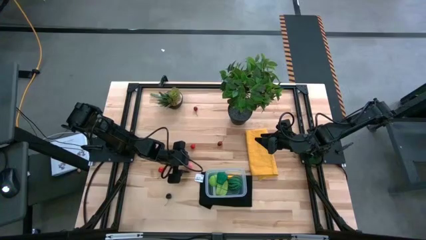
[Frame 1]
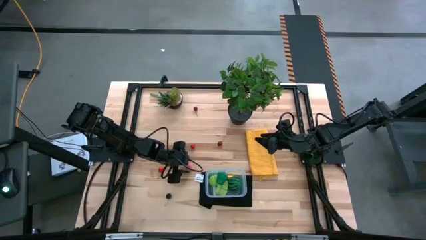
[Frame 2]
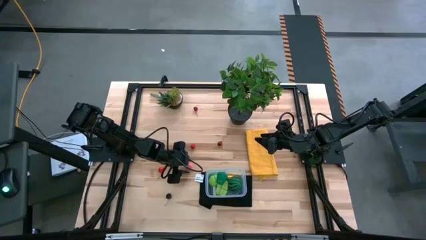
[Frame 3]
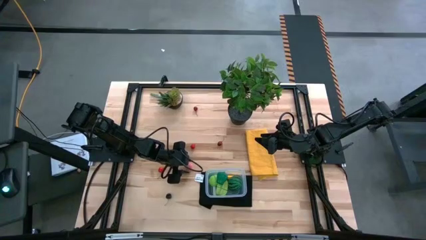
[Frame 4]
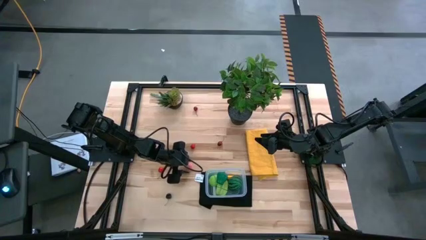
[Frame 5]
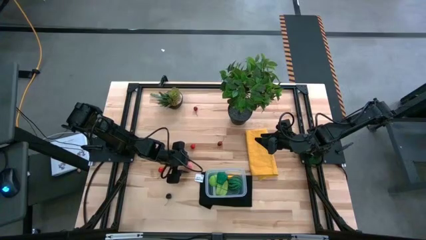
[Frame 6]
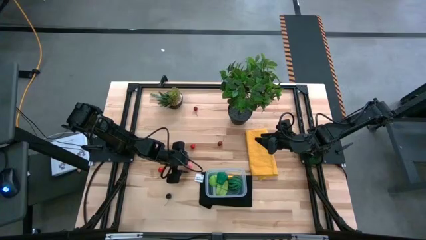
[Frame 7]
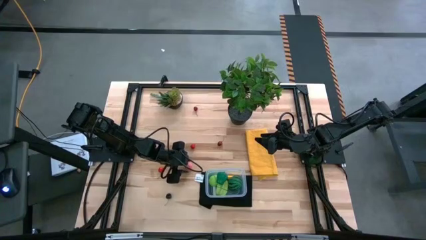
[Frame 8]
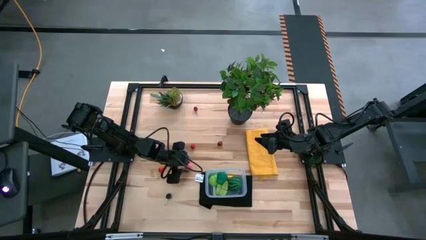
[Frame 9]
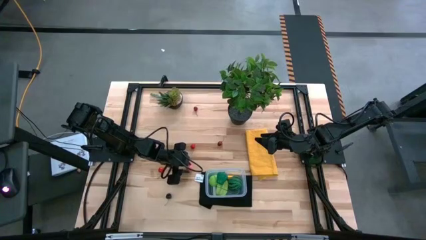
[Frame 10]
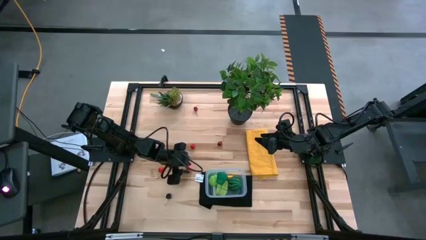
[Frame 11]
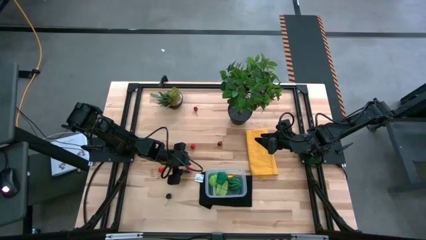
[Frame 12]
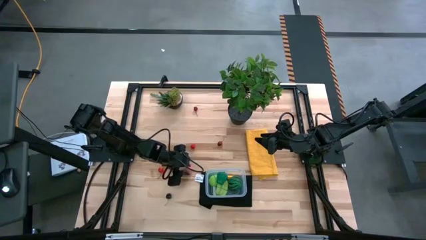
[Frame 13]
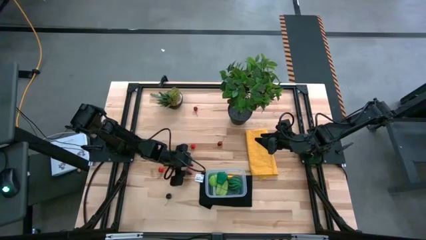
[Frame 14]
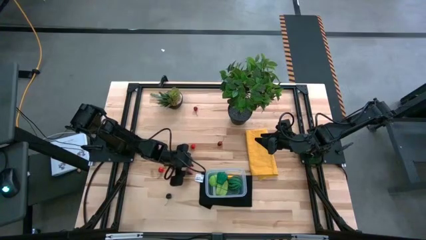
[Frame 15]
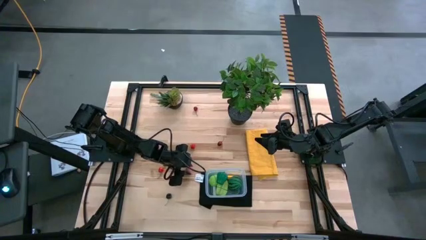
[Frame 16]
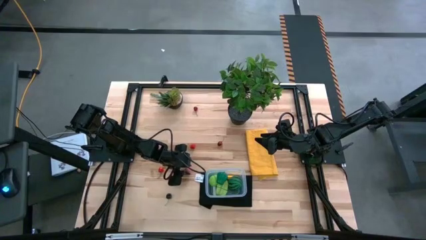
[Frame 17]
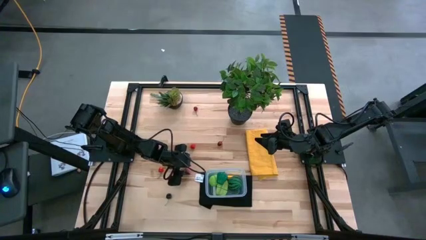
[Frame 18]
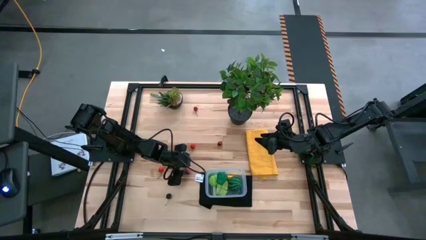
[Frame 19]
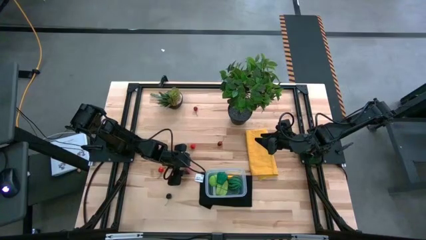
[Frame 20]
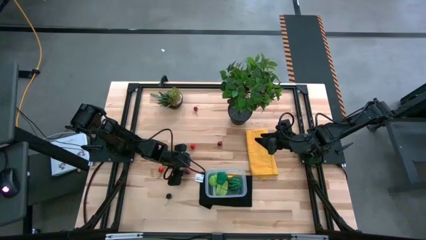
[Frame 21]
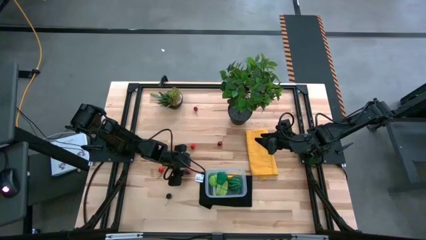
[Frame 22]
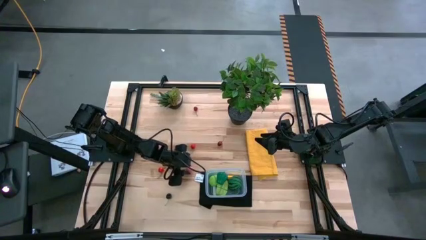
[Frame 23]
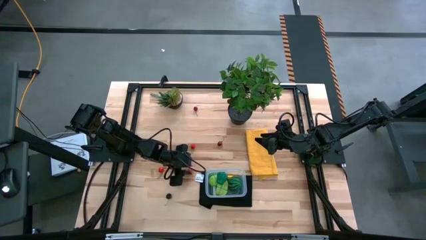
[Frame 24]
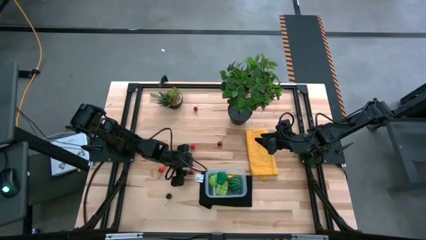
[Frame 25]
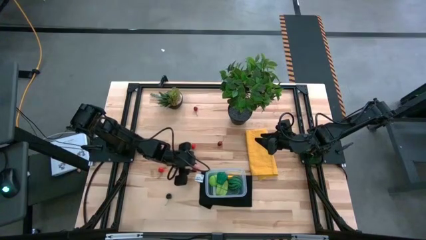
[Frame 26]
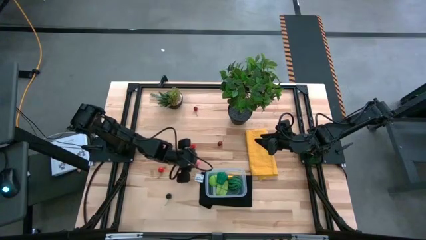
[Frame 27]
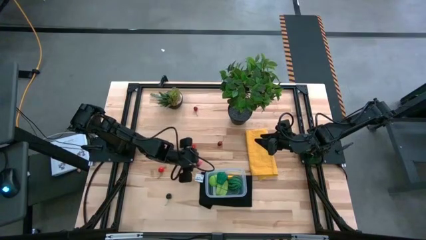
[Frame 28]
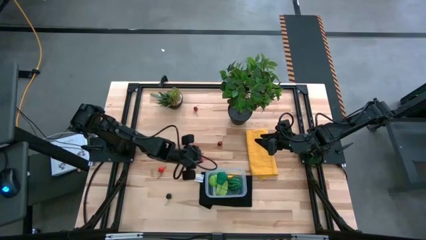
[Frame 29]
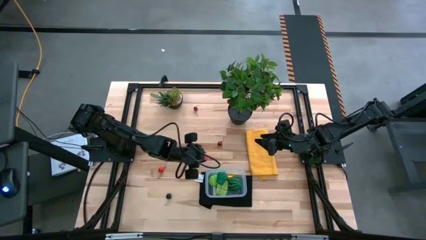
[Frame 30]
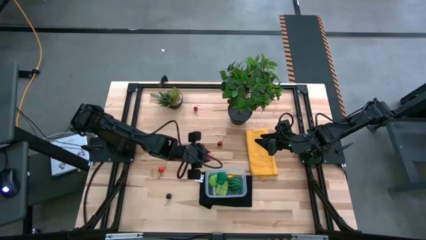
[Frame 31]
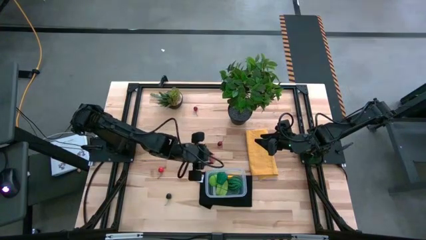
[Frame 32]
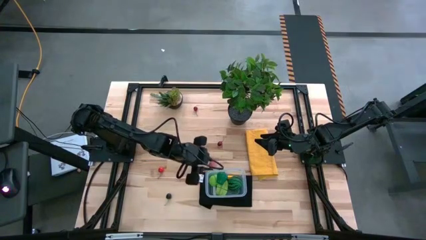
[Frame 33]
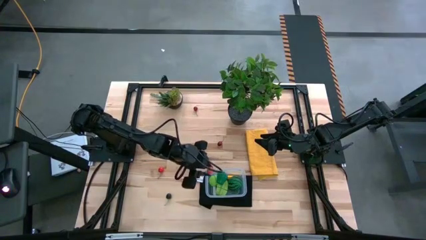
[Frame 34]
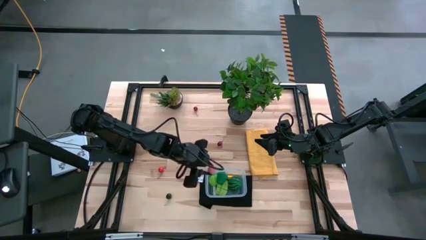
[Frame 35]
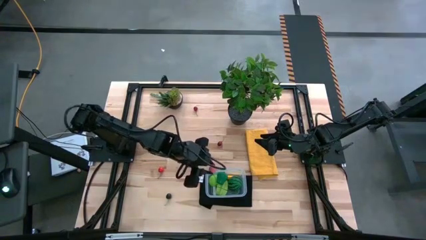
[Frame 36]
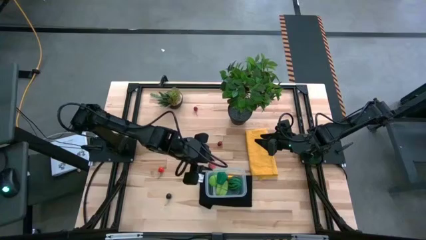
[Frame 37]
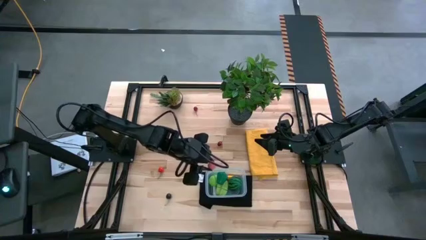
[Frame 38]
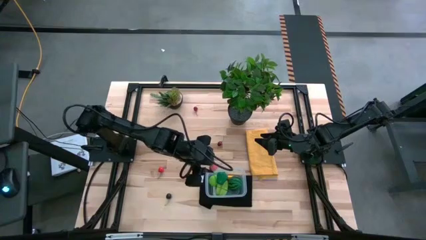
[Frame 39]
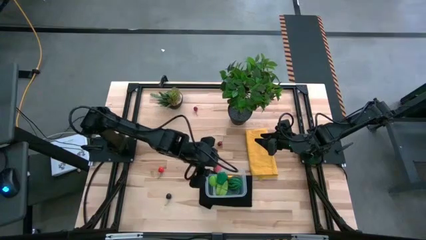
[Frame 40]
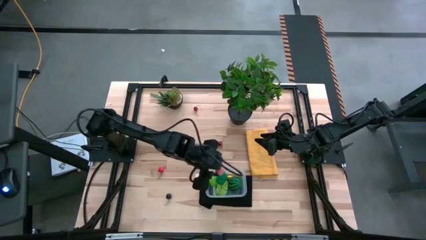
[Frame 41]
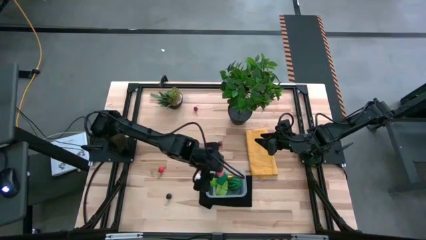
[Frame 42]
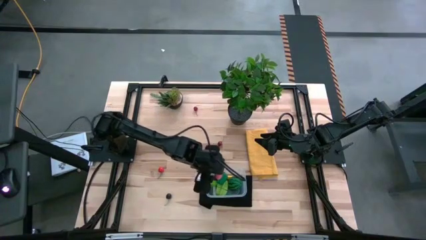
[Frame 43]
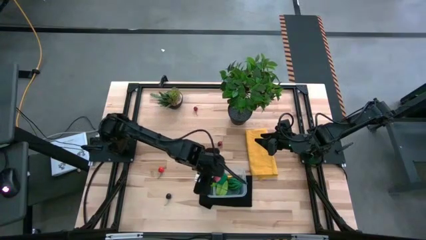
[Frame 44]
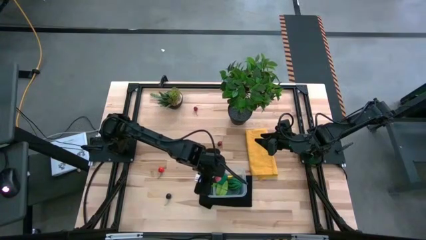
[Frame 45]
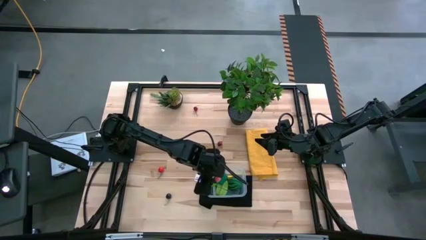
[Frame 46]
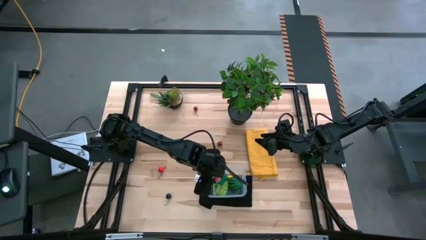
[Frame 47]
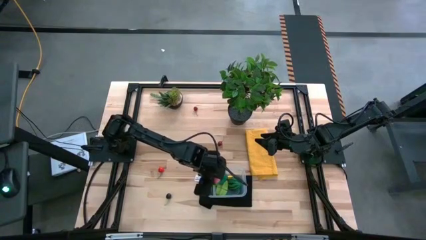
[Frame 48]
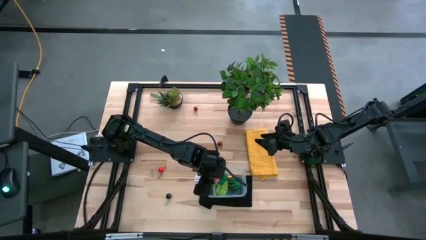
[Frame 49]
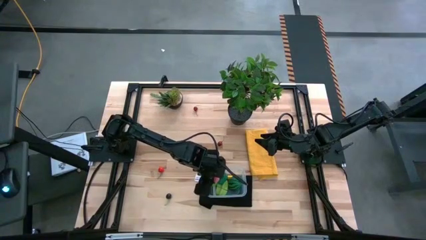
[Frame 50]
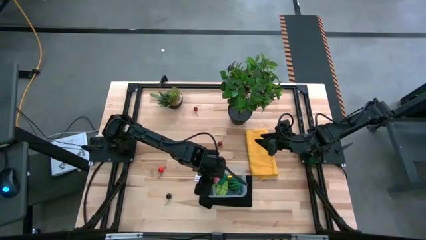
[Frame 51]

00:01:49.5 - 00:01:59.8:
Task: Pick and placing Produce into tupperware
Put the peach into the transparent bin

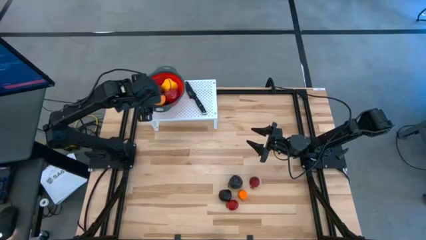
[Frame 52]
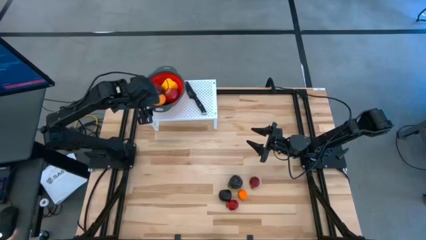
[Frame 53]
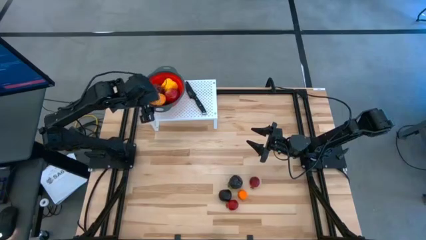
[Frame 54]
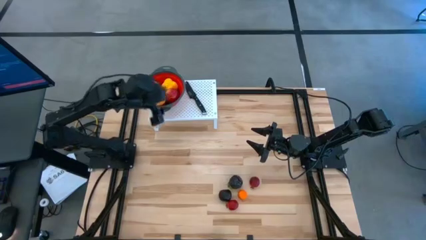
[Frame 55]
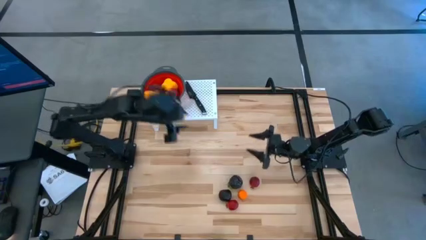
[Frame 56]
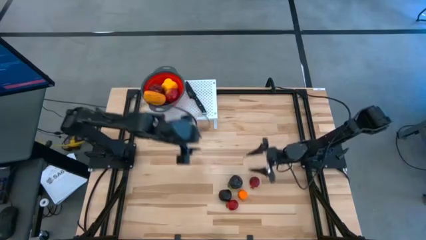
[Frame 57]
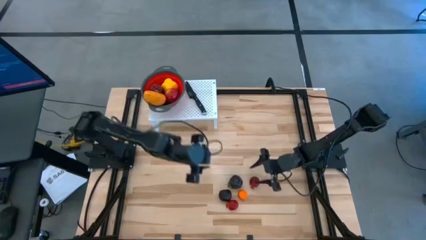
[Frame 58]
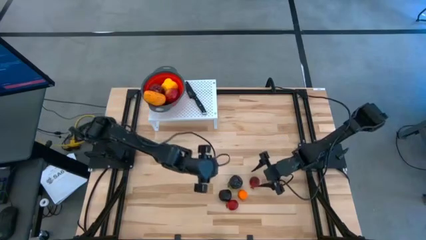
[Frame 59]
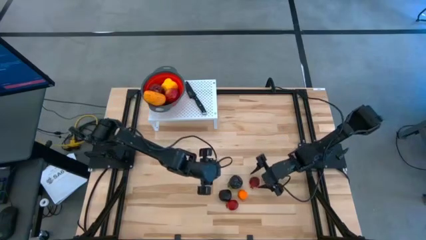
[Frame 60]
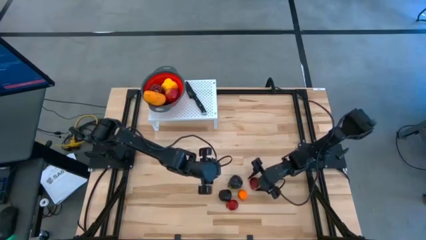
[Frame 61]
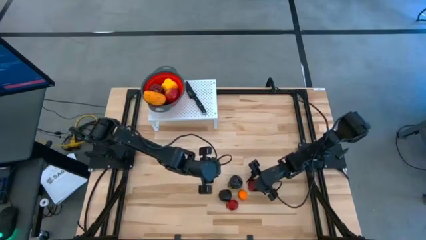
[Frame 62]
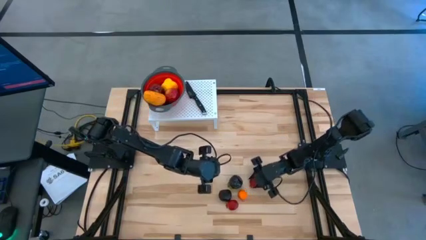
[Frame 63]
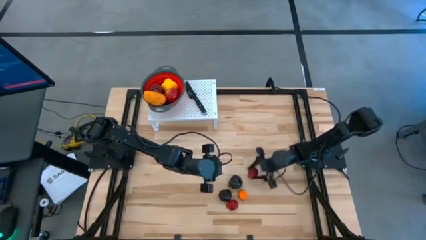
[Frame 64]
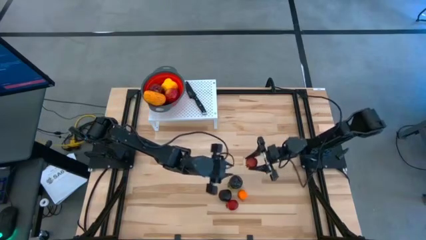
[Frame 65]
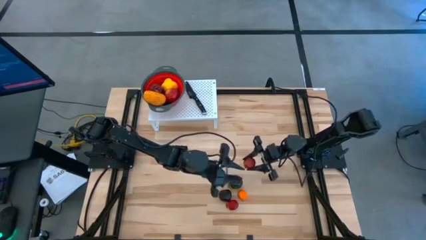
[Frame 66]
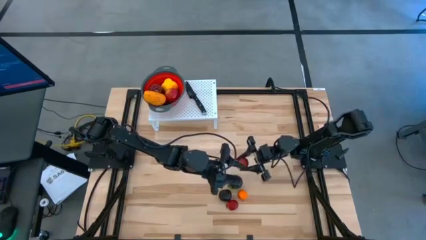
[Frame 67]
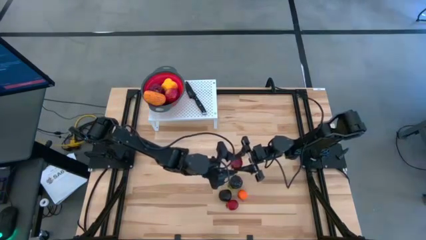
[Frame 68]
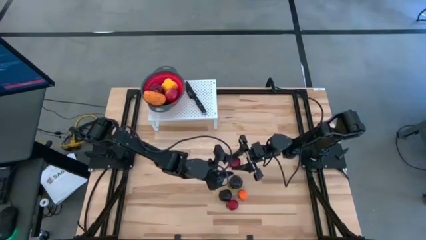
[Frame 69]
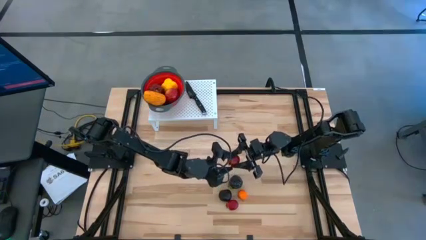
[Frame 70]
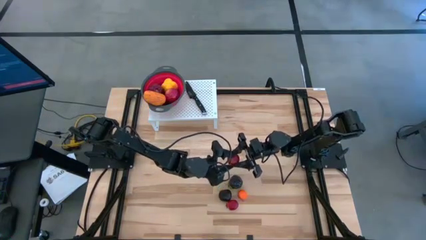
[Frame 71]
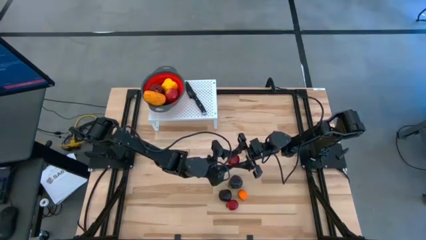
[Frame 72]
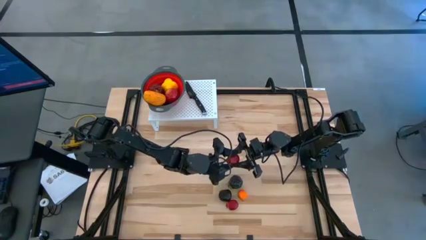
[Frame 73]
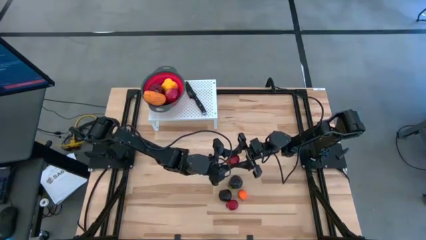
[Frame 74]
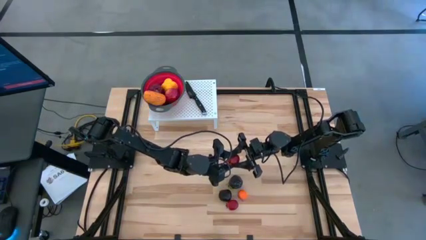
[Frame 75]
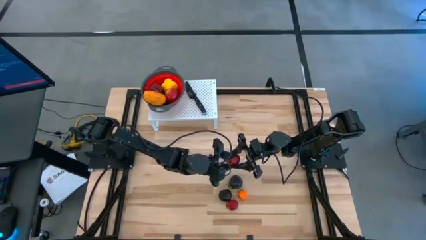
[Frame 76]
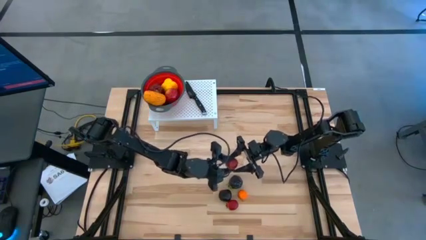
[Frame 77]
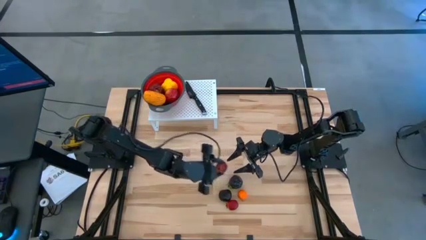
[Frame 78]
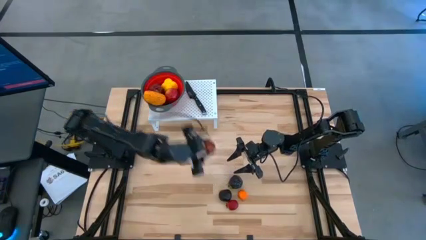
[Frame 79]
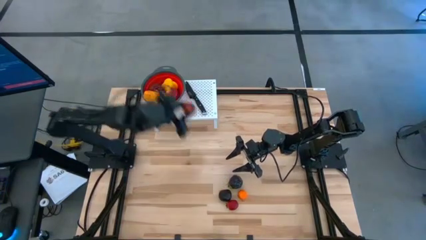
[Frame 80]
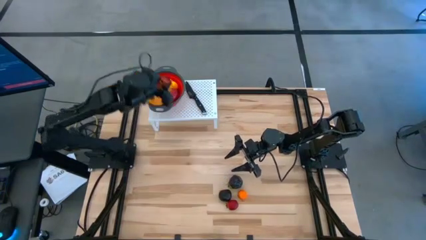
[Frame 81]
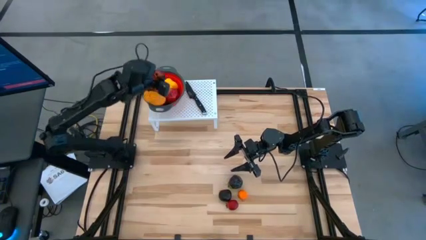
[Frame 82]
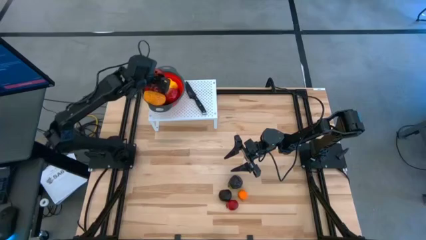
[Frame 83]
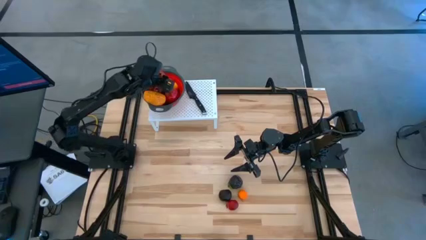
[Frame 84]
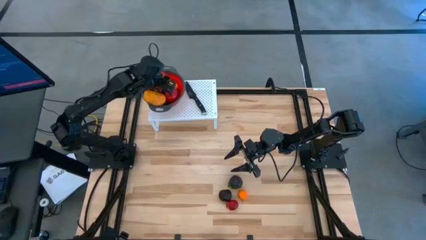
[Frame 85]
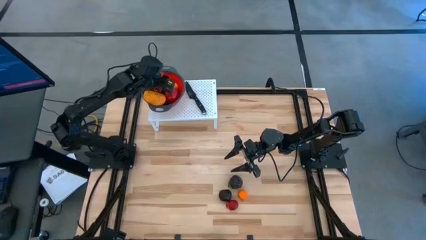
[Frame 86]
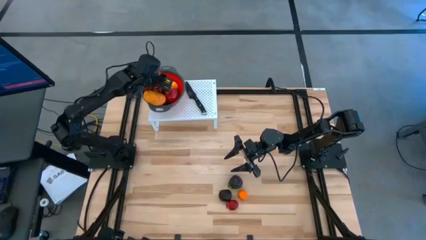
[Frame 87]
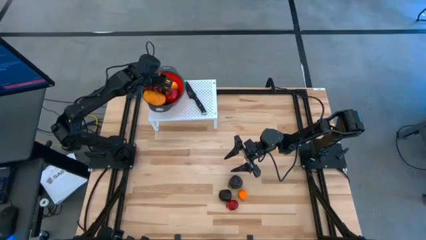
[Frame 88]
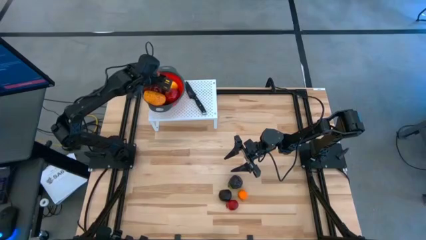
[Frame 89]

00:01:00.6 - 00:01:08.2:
Task: Pick & Place Fruit
Put the top red pomegranate into the red strainer bowl on the shelf
